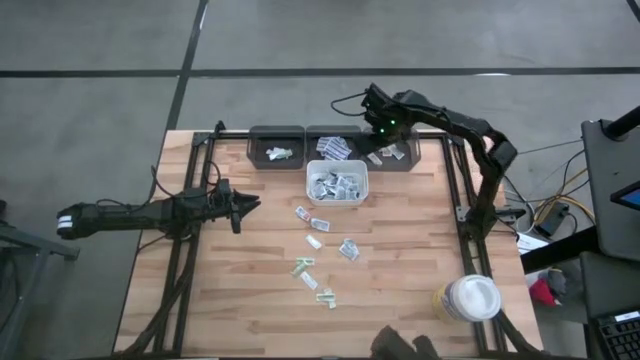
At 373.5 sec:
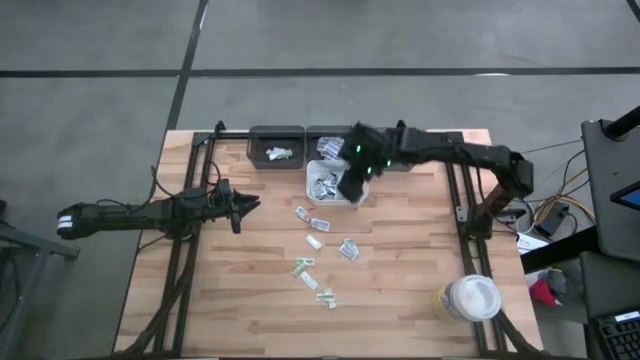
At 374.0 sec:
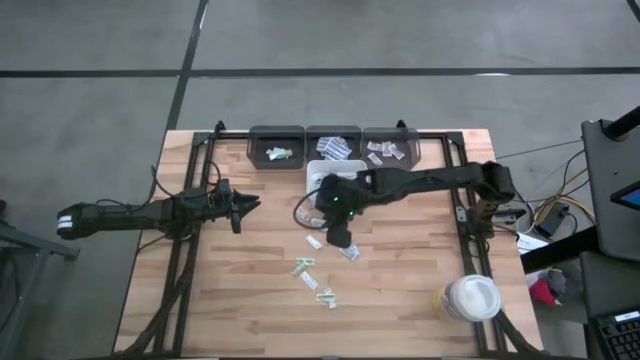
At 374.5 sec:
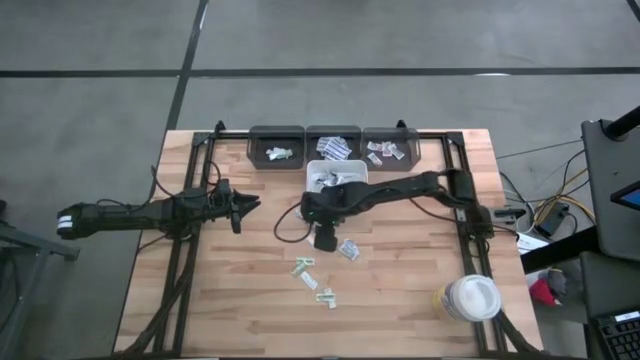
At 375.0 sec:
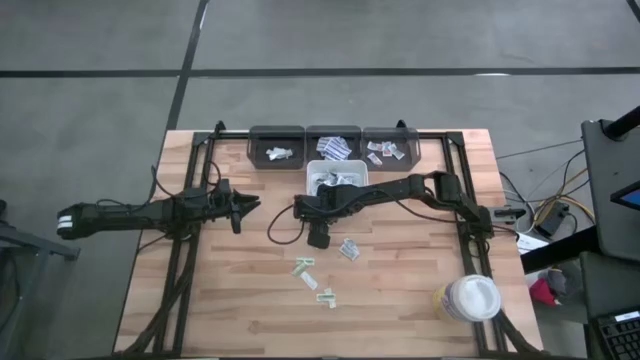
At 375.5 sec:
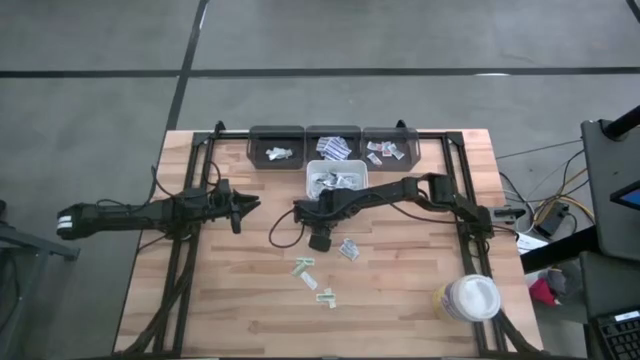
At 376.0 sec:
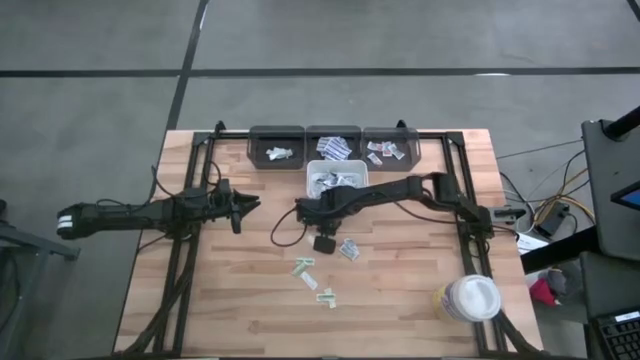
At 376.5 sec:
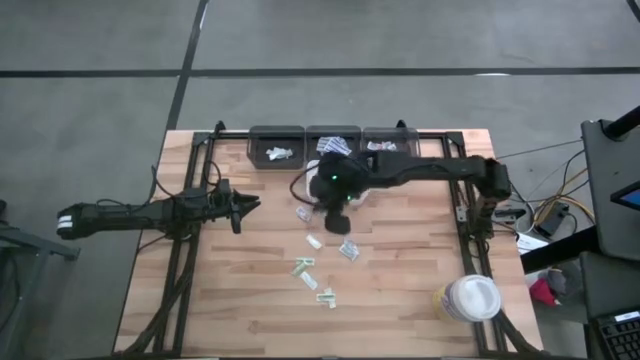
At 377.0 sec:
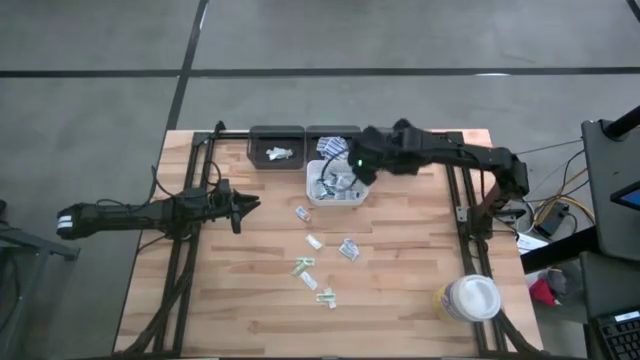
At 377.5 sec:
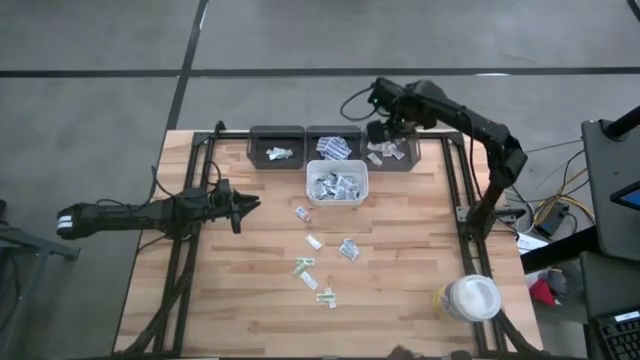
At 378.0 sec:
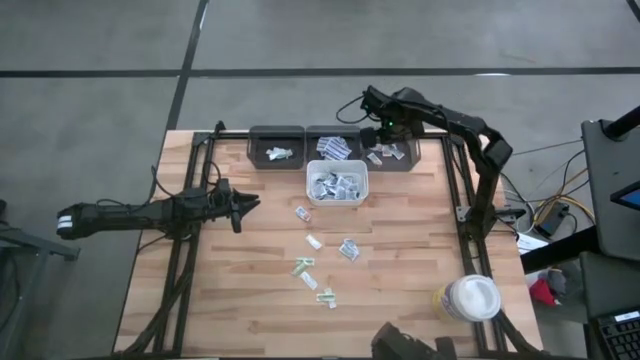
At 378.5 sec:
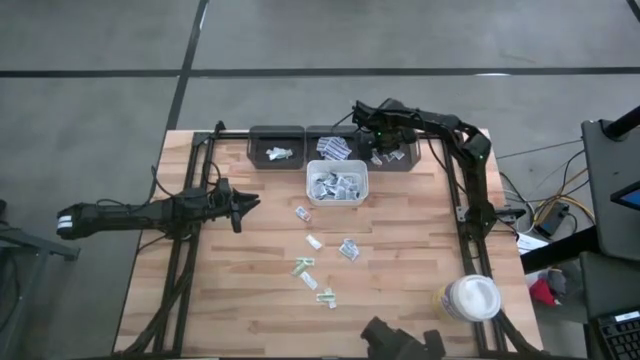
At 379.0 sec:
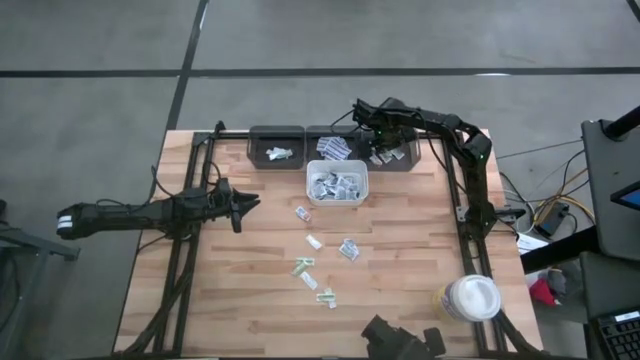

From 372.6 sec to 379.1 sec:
Task: Pick & Place First Aid Supplies
Put the orange ointment pack into the right black bin

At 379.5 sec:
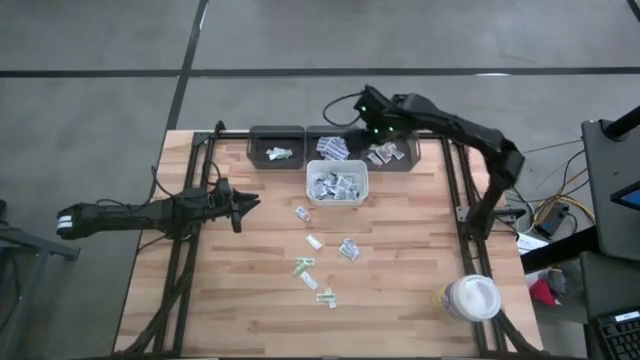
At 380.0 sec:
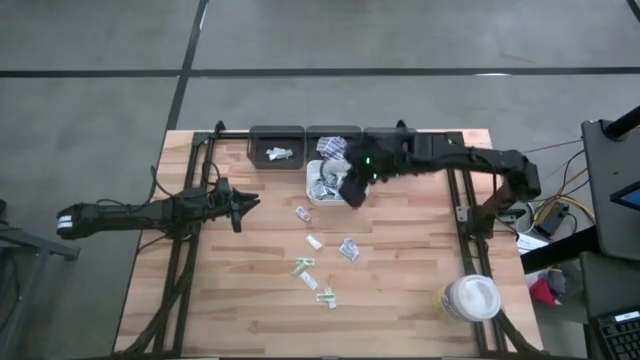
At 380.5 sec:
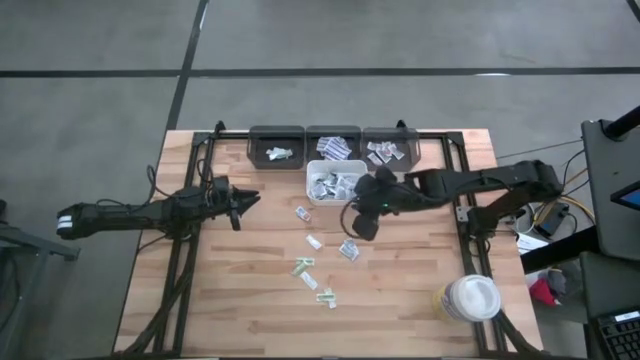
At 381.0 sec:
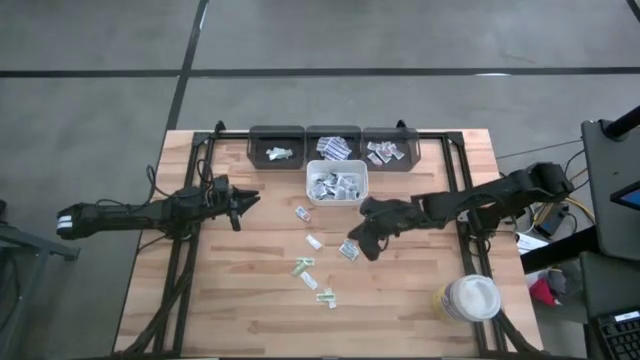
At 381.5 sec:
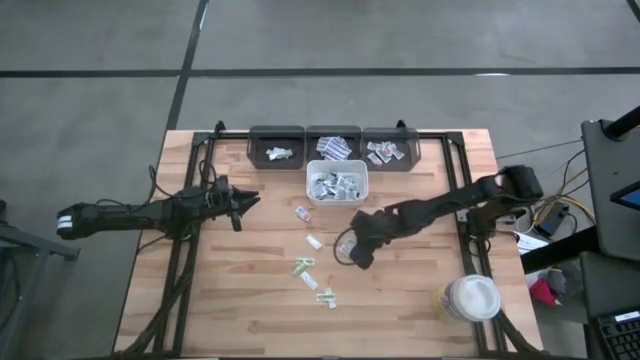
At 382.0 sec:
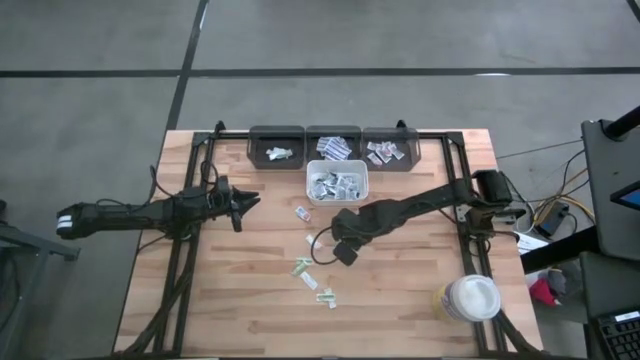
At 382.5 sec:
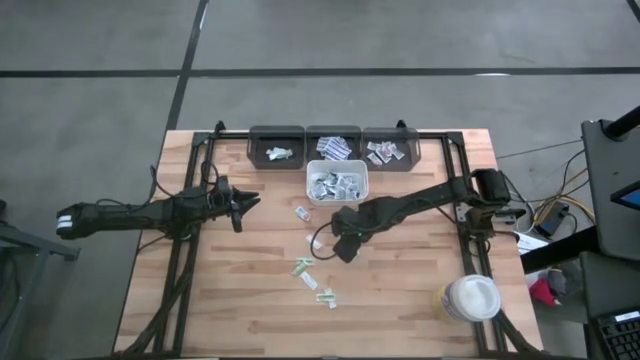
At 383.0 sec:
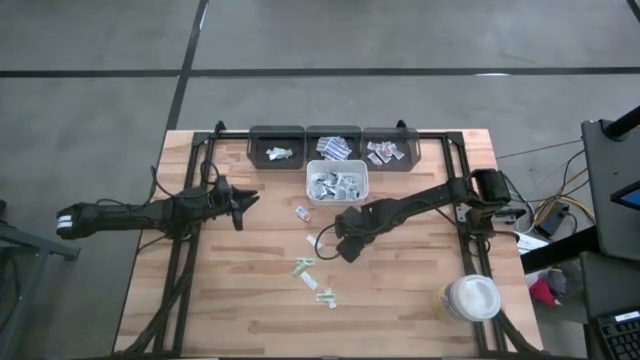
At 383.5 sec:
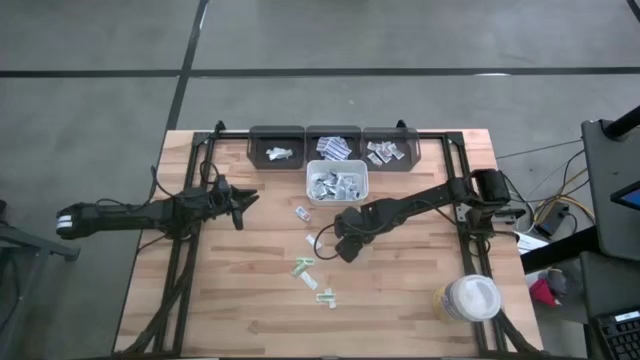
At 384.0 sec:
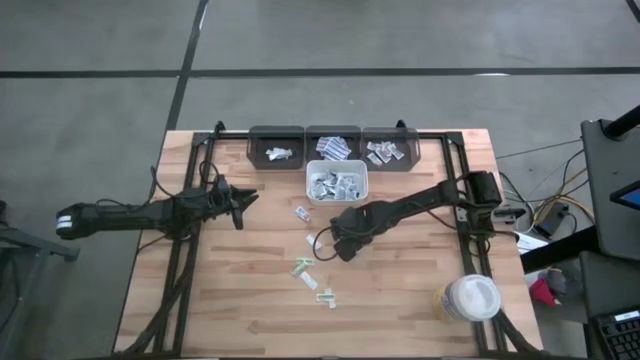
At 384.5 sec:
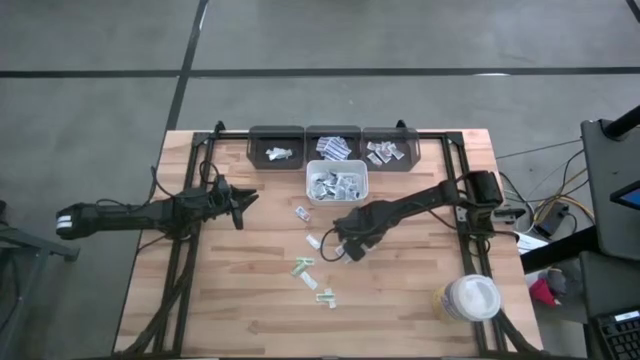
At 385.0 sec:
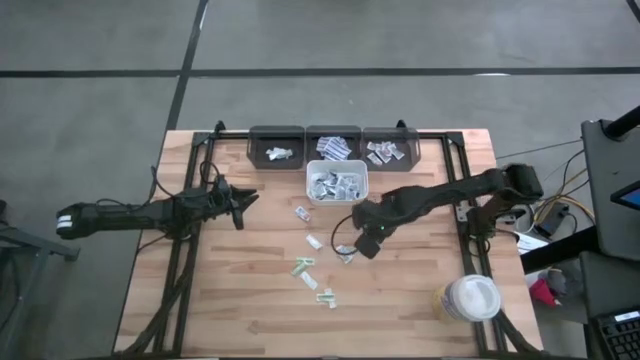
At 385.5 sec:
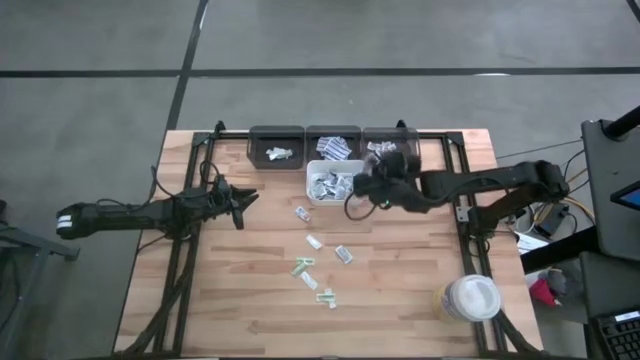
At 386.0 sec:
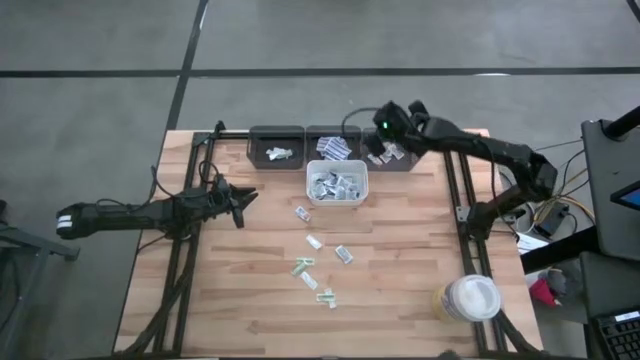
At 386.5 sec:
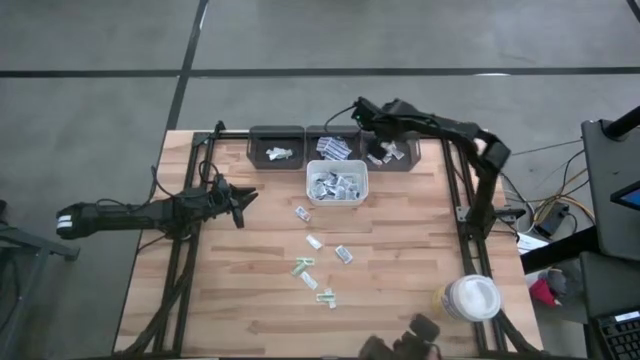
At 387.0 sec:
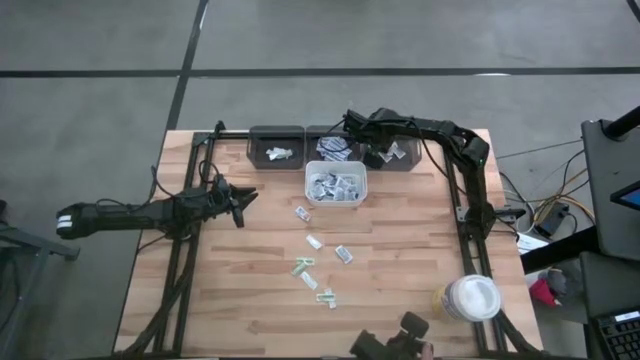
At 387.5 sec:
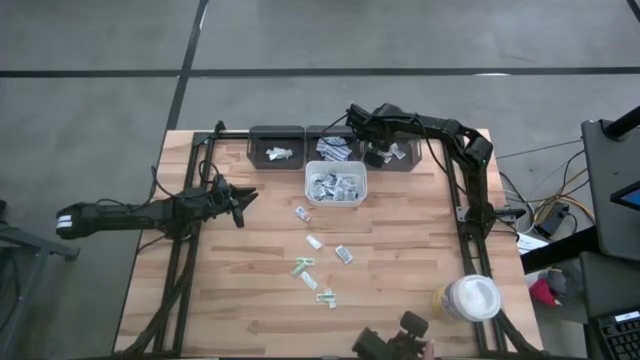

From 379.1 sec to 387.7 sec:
Put the orange ointment pack into the right black bin

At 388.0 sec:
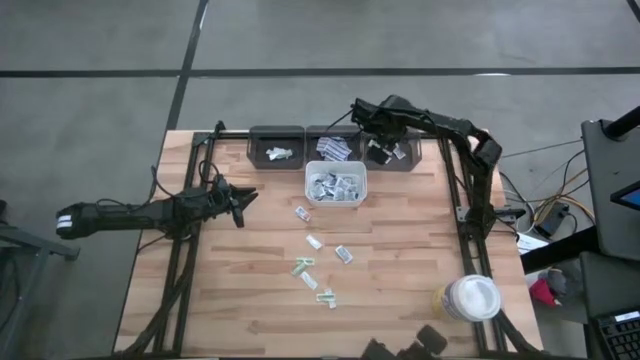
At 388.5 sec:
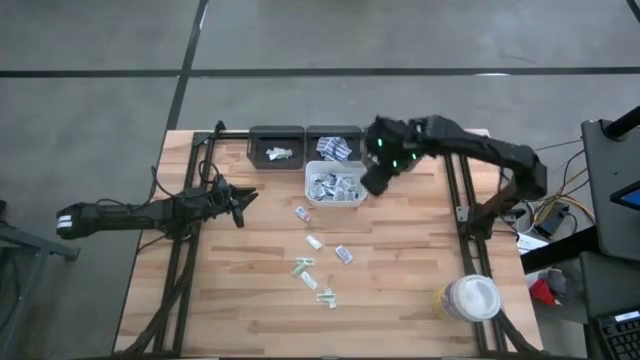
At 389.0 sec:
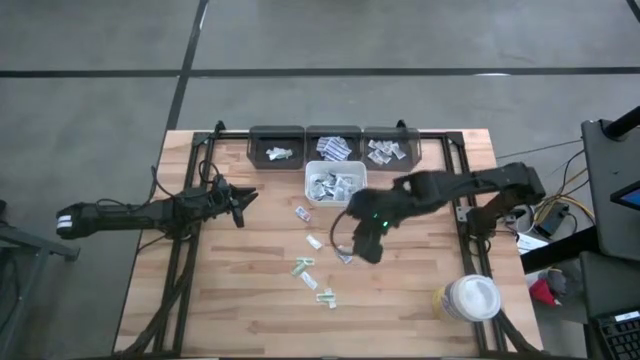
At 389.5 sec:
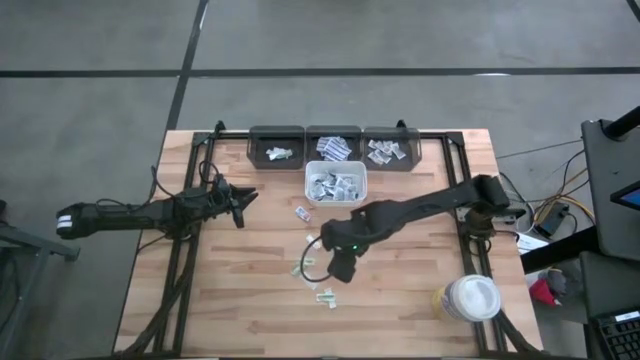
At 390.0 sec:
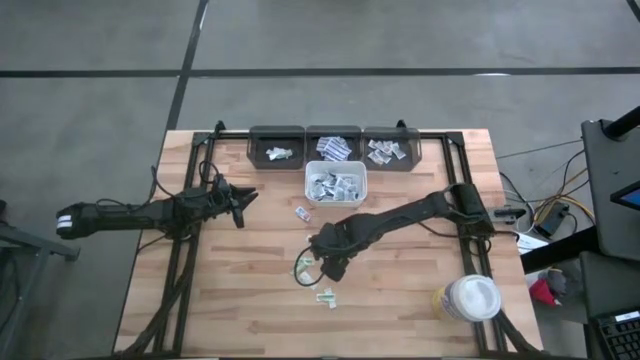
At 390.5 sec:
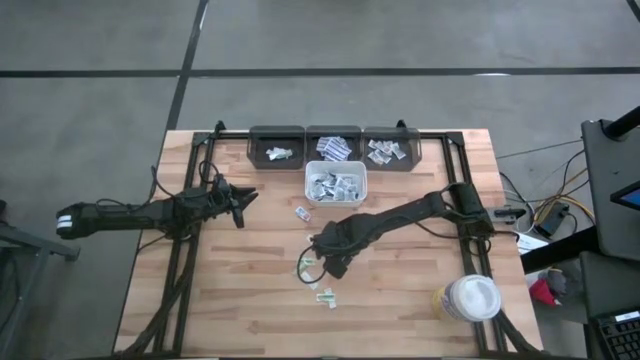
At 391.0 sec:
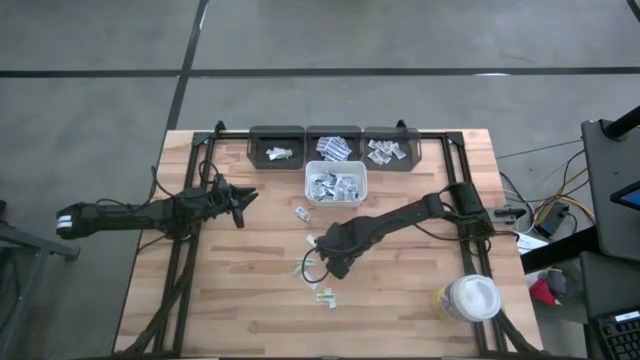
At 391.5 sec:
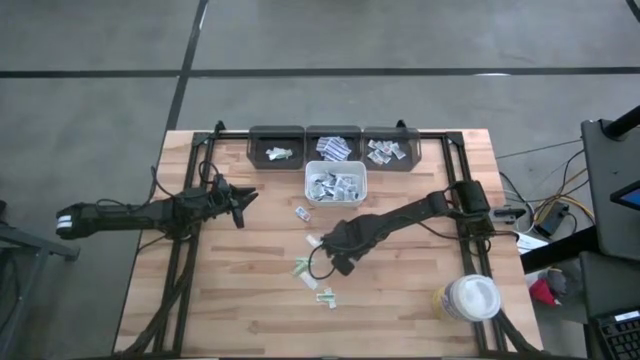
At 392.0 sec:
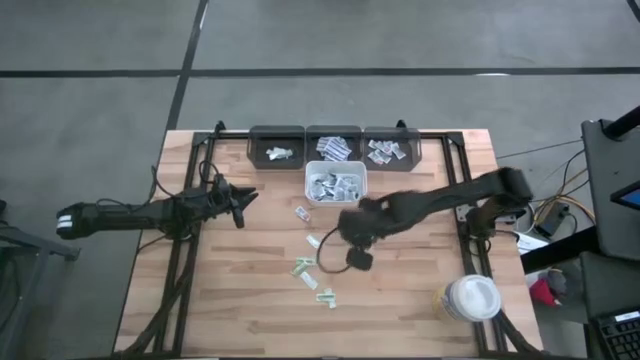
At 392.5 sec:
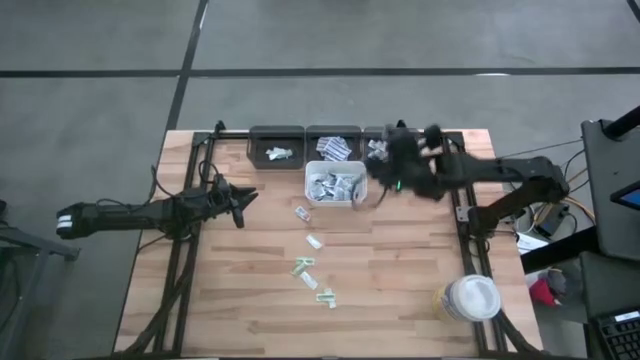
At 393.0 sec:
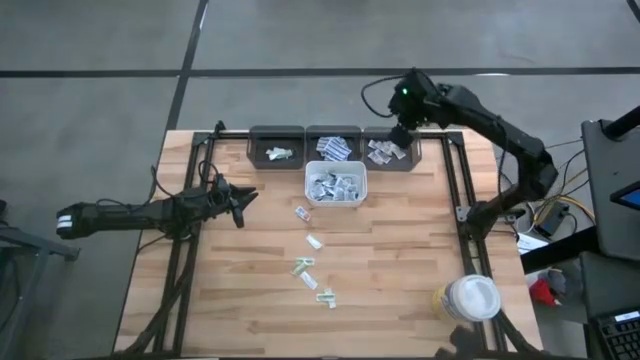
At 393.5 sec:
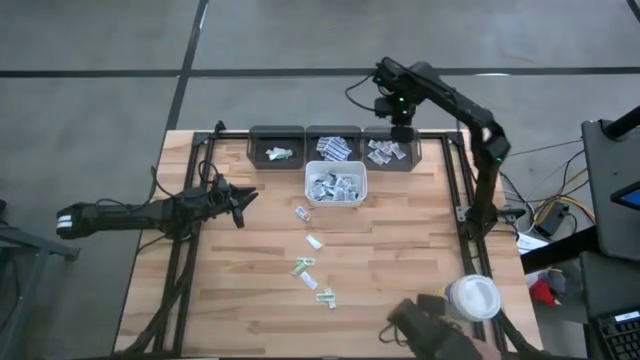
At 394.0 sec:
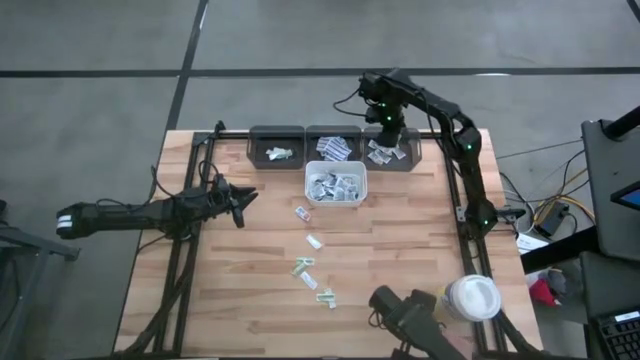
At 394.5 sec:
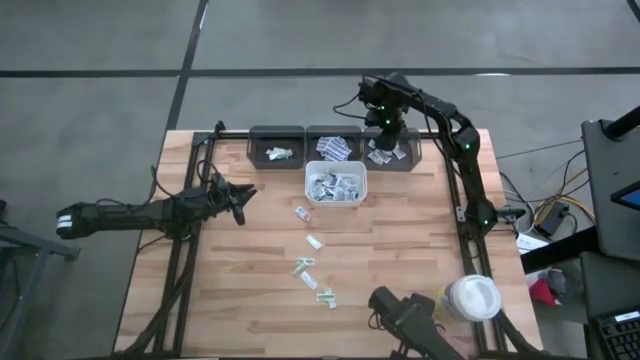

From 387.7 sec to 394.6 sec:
Put the orange ointment pack into the right black bin
